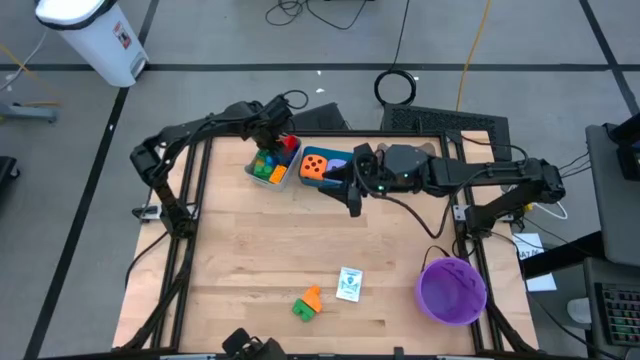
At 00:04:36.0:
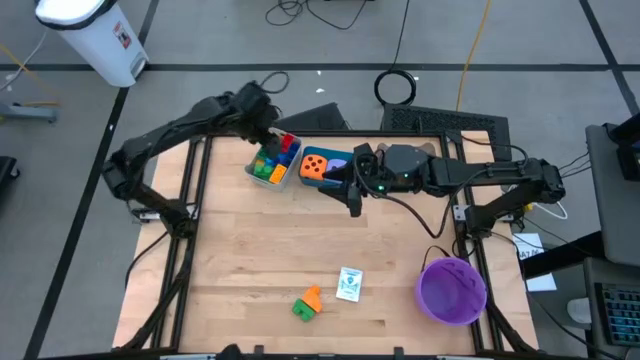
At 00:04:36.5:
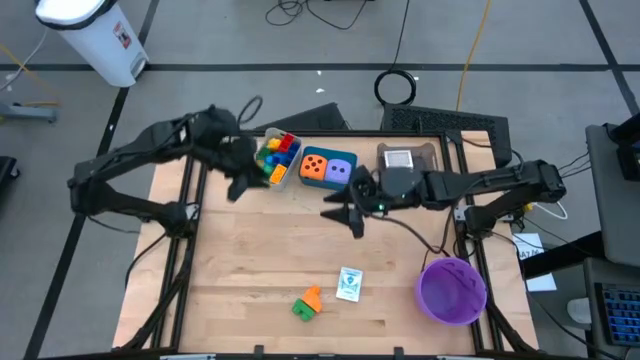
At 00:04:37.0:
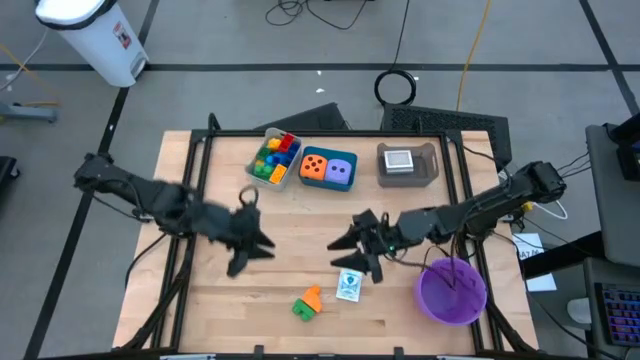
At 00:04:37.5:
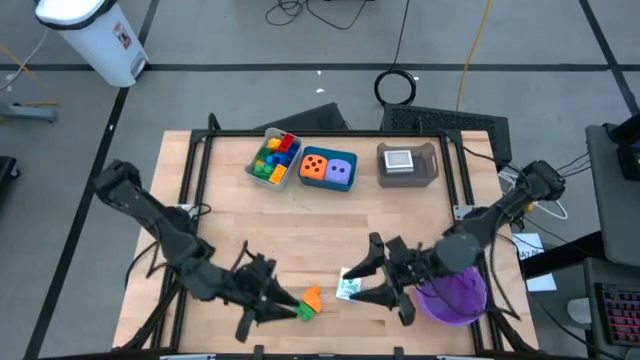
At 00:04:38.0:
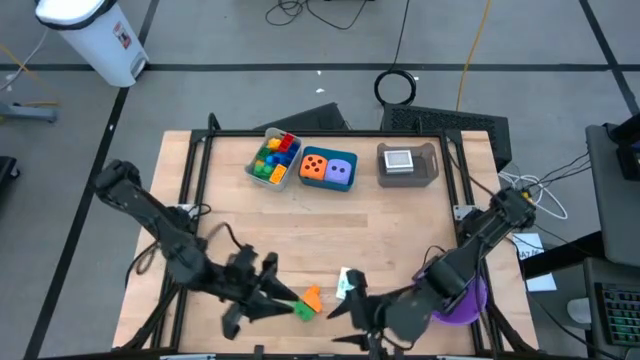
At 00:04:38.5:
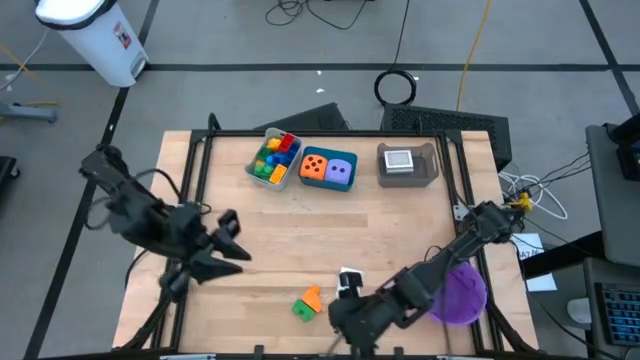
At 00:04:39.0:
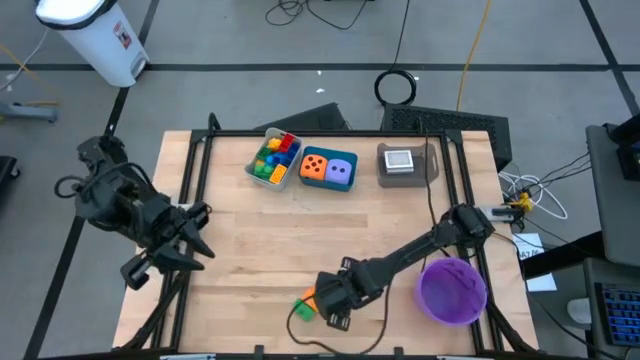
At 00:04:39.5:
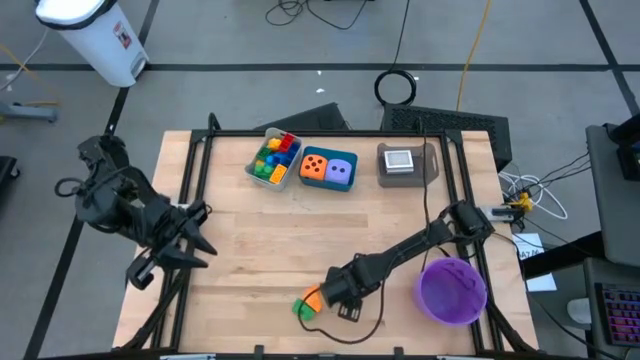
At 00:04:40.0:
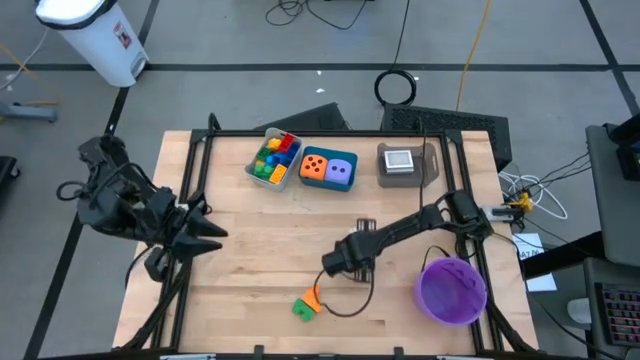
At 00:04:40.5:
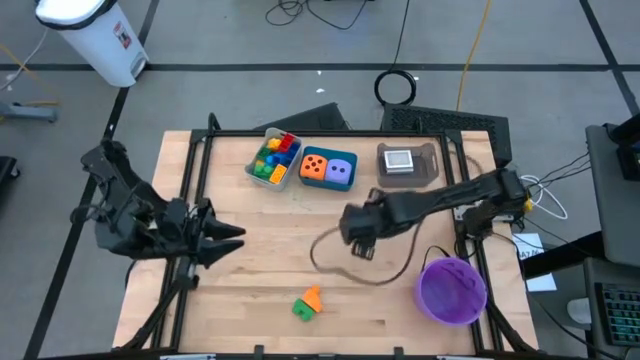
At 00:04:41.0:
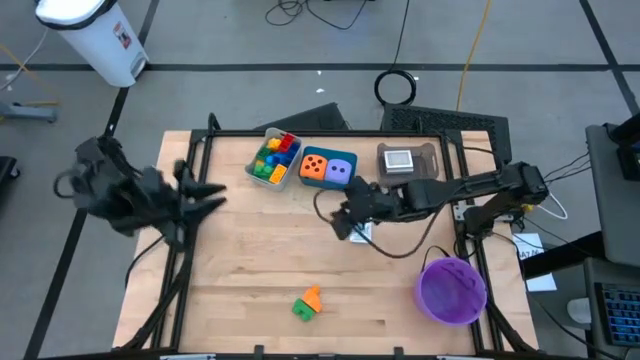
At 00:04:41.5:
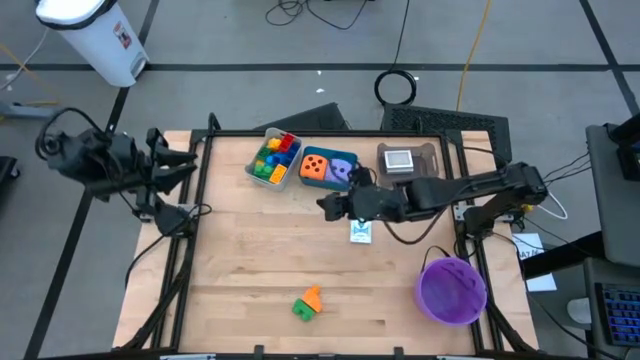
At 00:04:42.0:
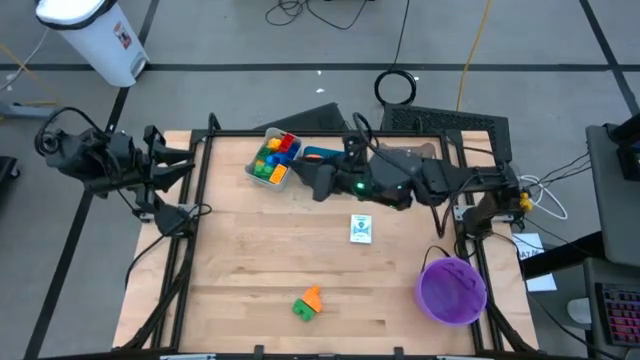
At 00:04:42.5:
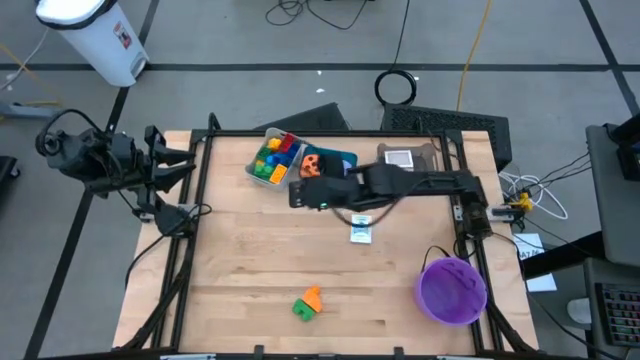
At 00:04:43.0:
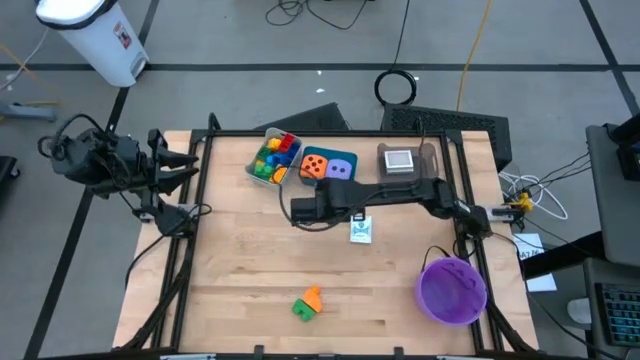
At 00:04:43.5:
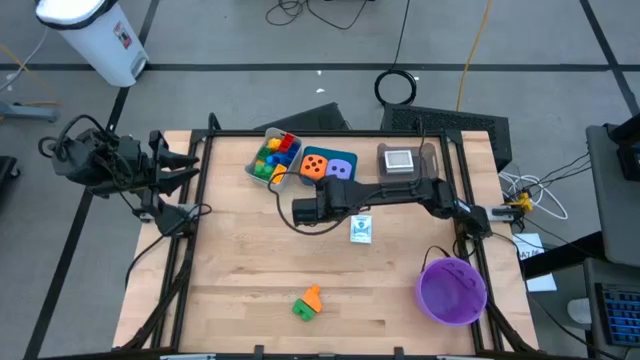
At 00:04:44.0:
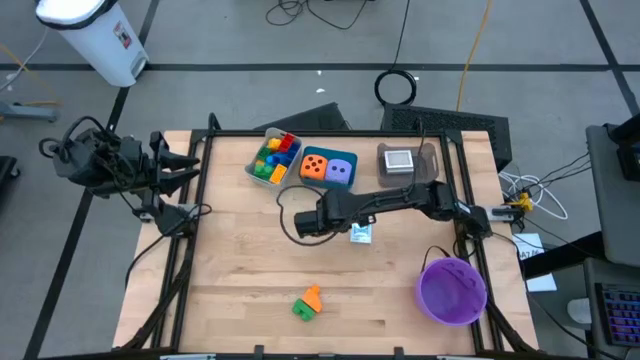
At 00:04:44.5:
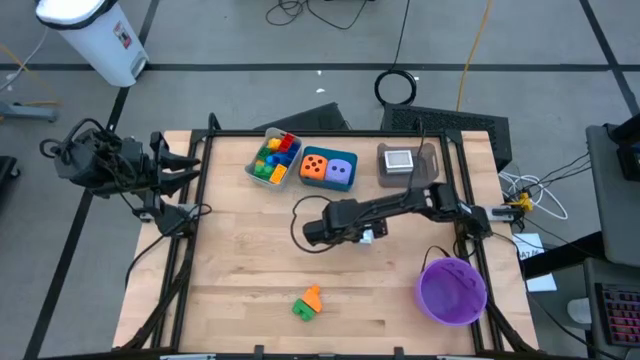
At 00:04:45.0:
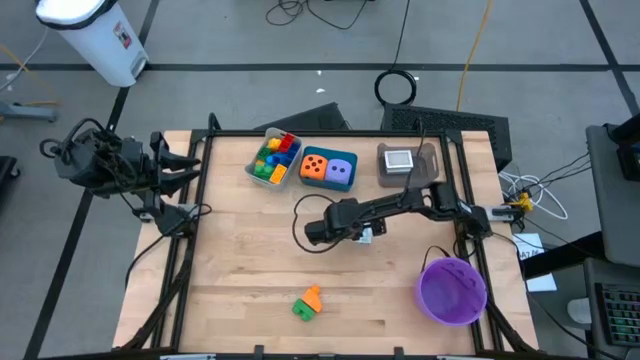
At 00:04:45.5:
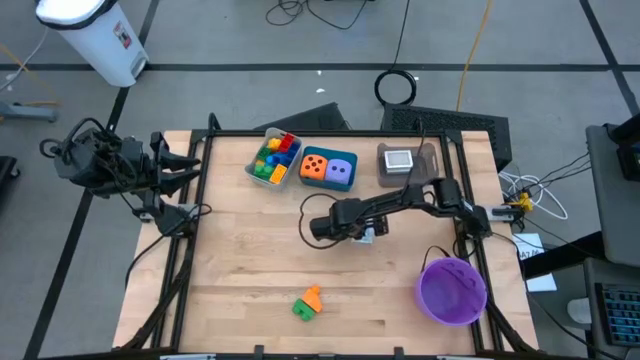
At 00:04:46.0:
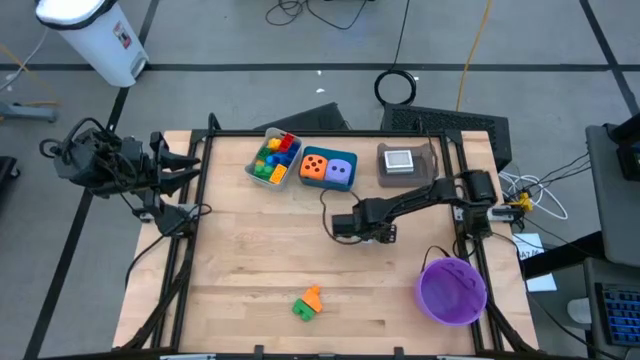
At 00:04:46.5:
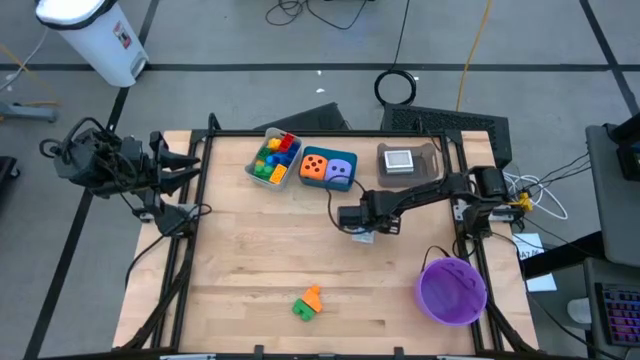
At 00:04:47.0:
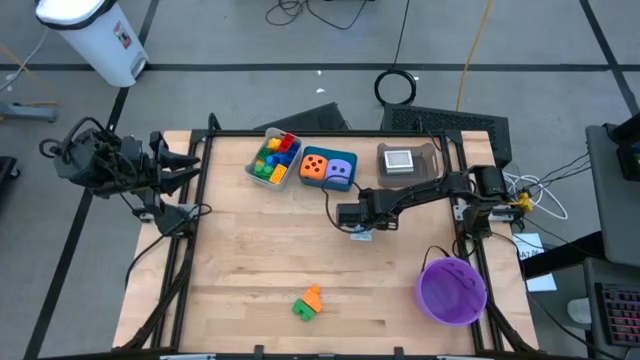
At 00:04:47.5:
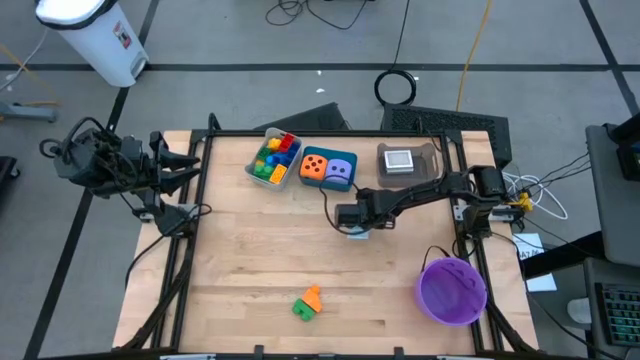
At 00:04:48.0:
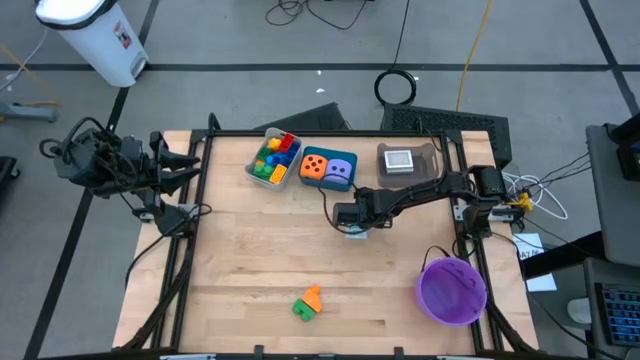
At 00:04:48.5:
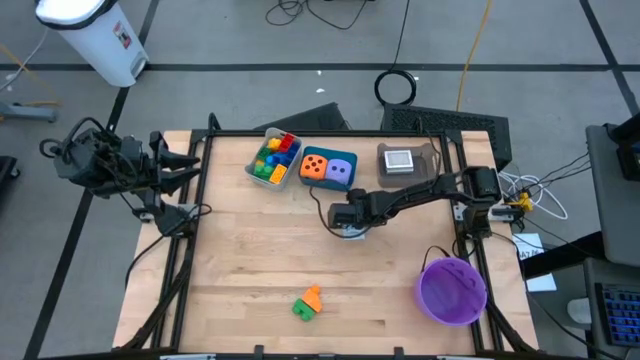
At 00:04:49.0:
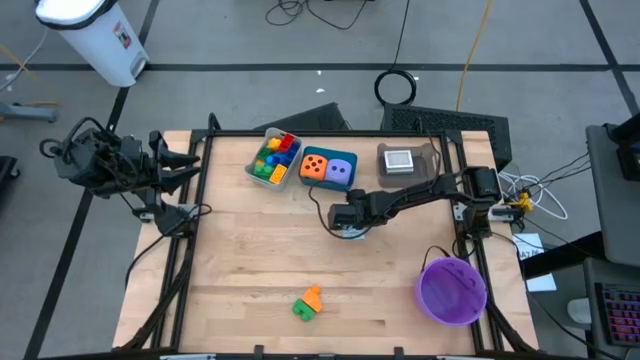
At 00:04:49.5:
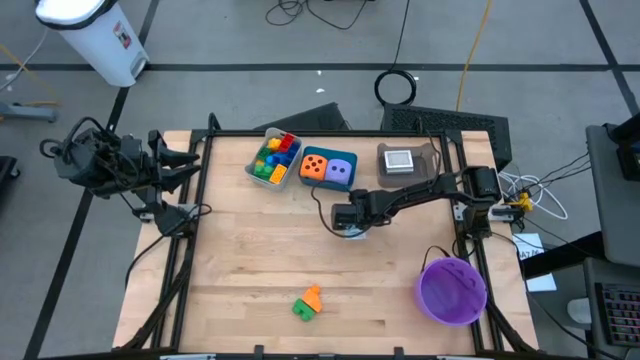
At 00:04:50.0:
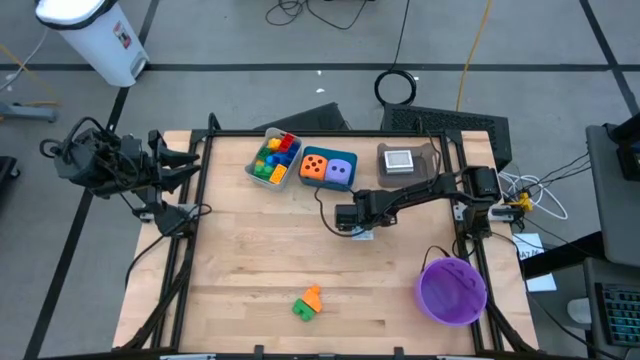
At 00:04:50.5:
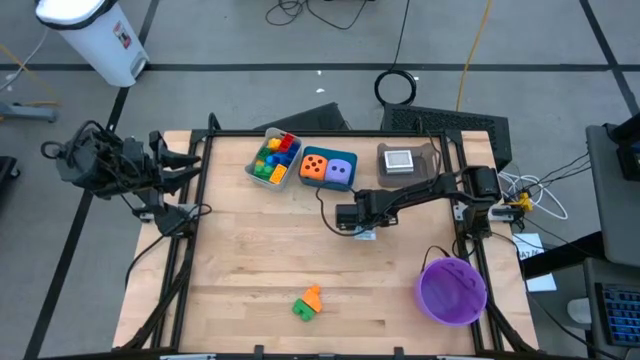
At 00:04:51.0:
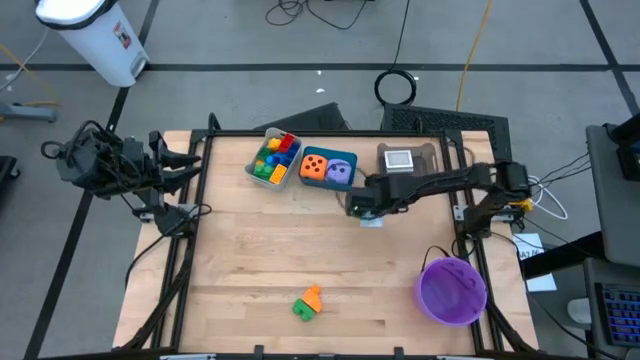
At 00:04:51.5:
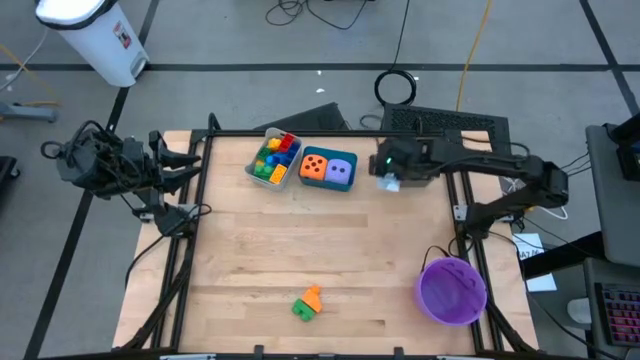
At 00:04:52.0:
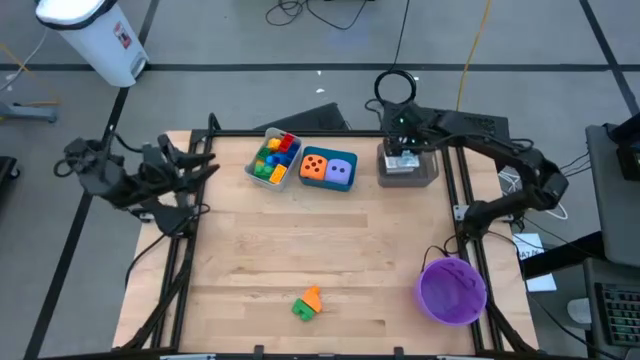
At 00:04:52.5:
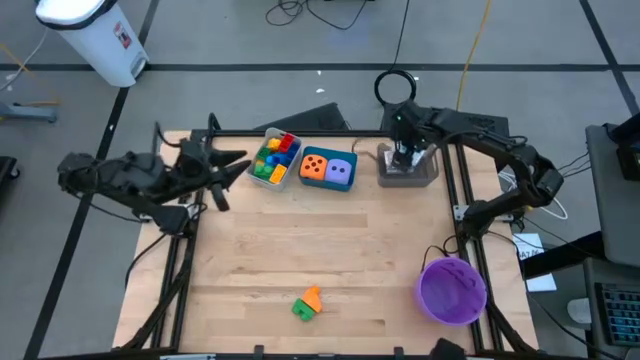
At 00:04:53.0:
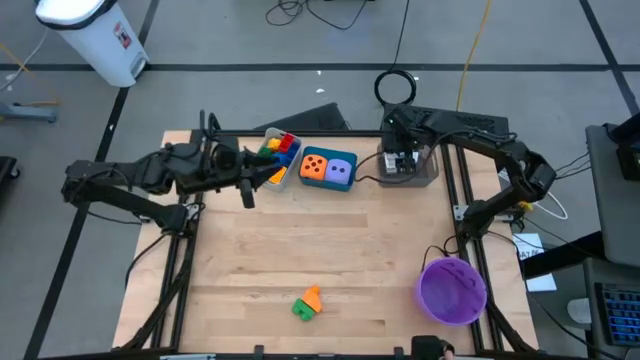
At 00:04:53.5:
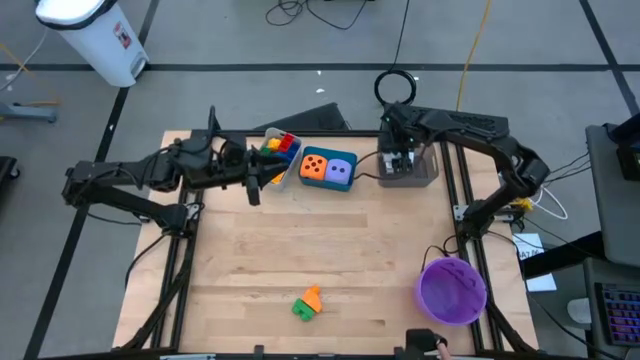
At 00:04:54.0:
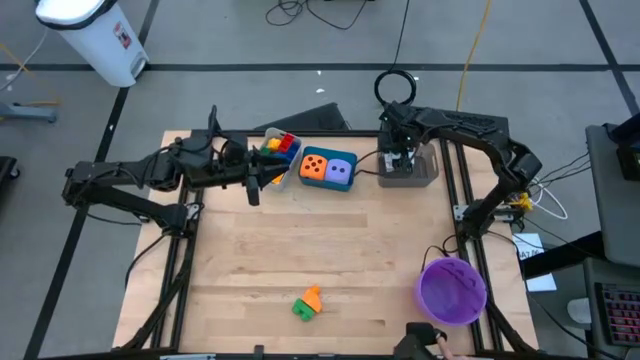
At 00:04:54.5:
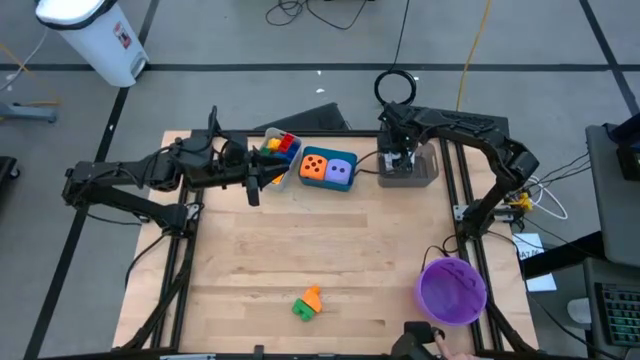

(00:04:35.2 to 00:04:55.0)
Task: Pick & Place Toys
Put the blue deck of cards into the black bin
